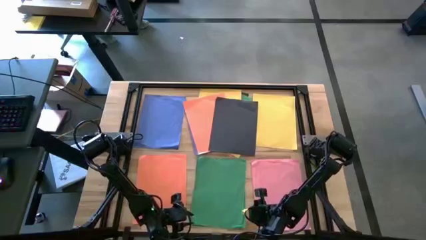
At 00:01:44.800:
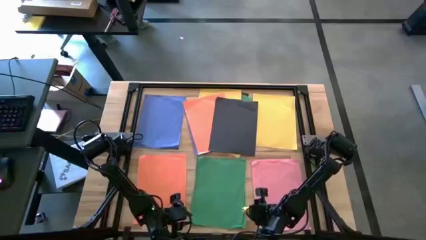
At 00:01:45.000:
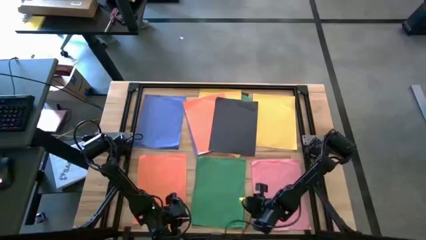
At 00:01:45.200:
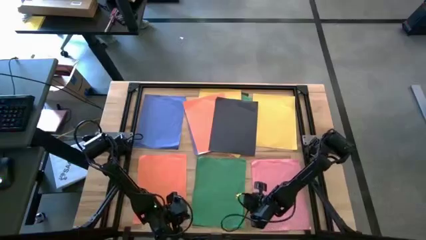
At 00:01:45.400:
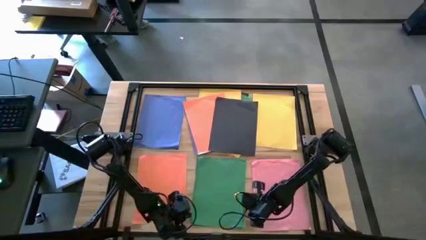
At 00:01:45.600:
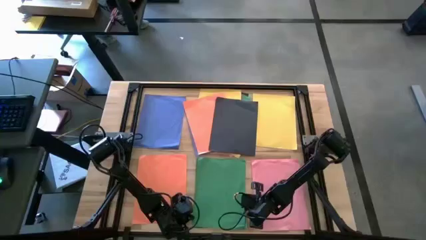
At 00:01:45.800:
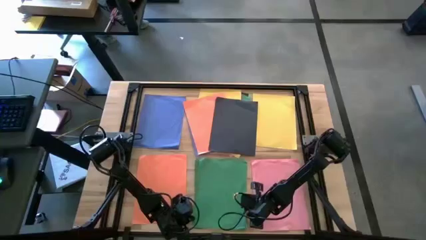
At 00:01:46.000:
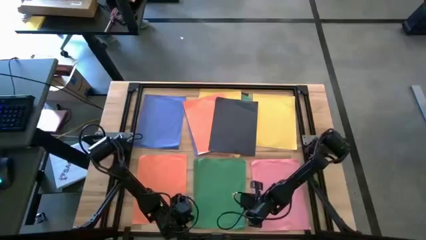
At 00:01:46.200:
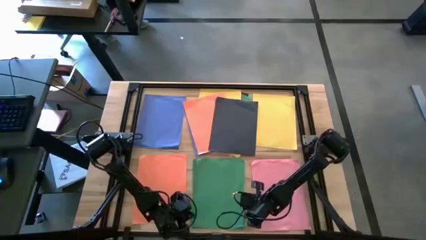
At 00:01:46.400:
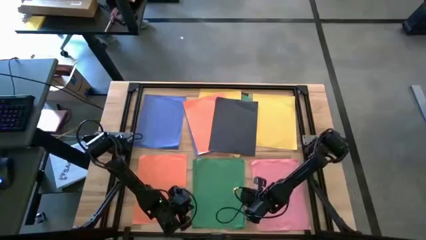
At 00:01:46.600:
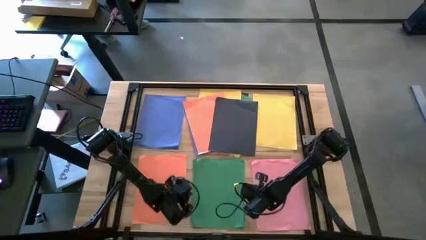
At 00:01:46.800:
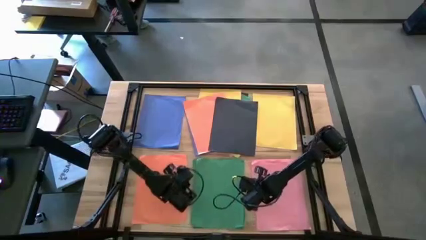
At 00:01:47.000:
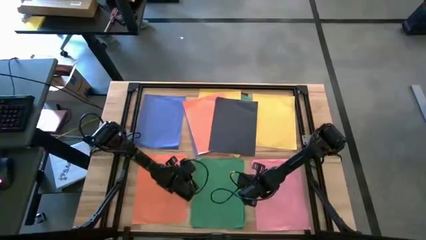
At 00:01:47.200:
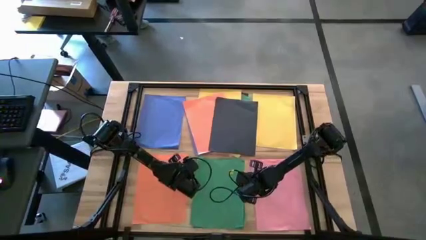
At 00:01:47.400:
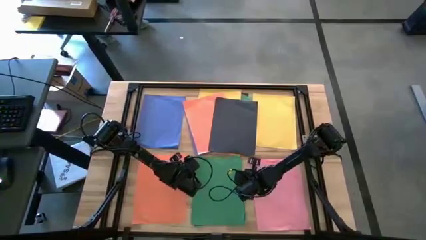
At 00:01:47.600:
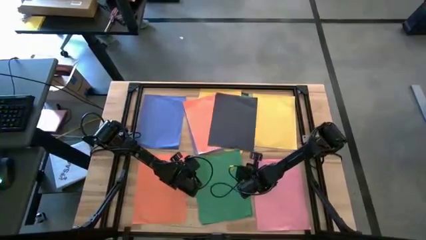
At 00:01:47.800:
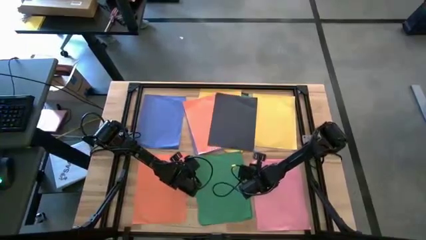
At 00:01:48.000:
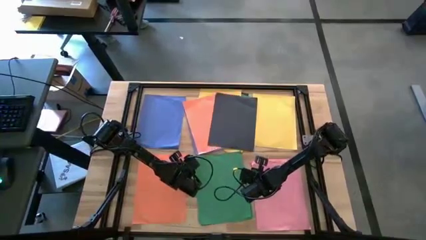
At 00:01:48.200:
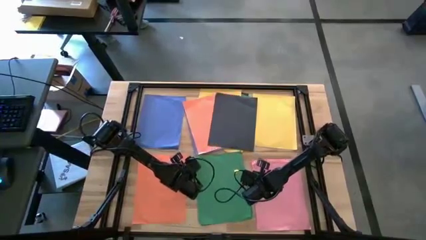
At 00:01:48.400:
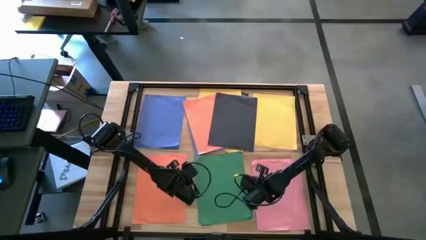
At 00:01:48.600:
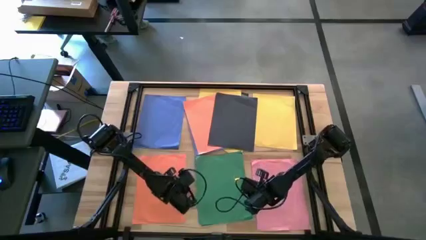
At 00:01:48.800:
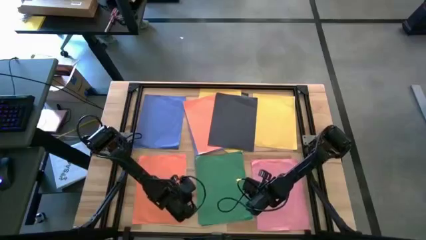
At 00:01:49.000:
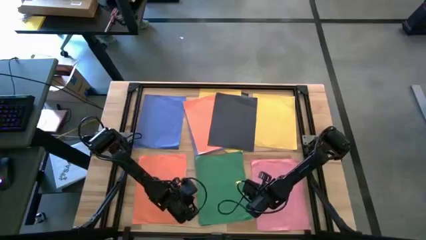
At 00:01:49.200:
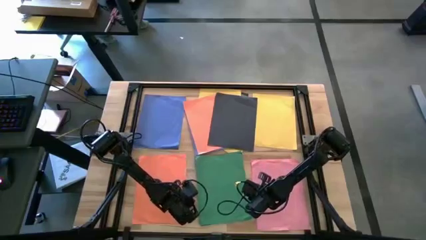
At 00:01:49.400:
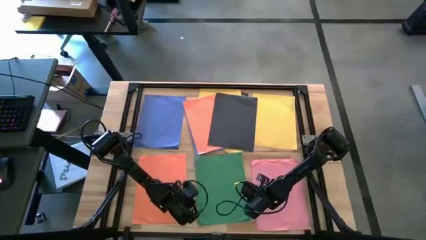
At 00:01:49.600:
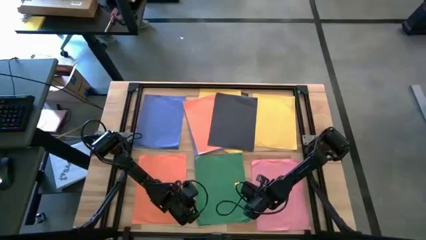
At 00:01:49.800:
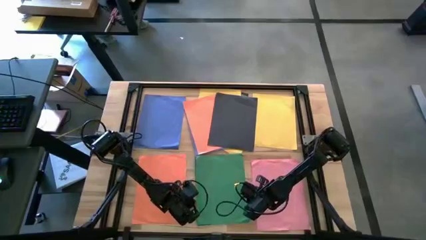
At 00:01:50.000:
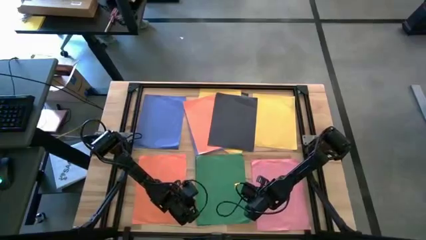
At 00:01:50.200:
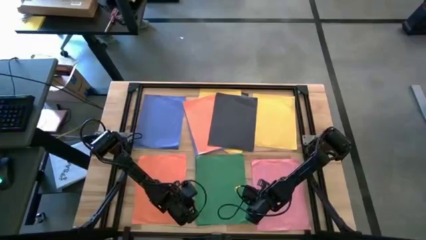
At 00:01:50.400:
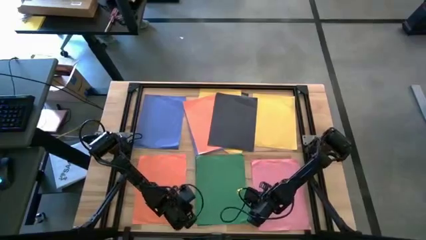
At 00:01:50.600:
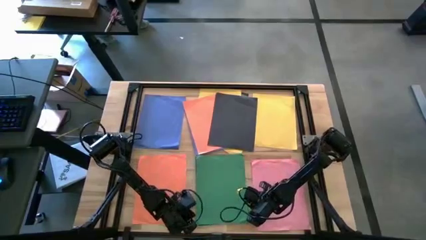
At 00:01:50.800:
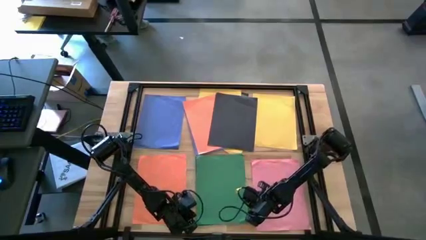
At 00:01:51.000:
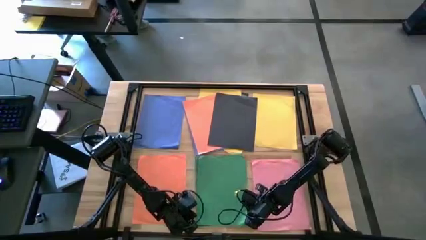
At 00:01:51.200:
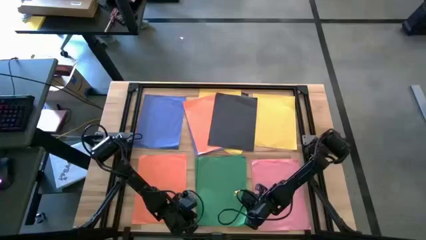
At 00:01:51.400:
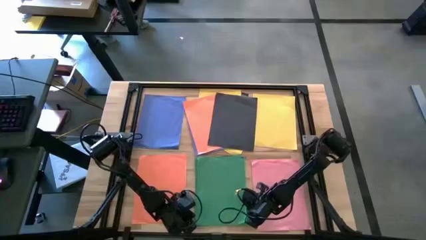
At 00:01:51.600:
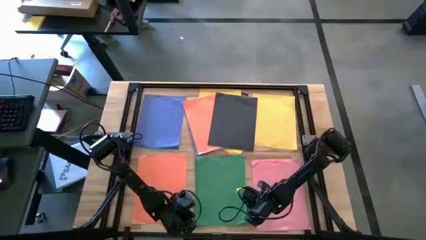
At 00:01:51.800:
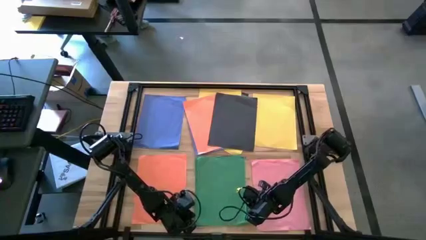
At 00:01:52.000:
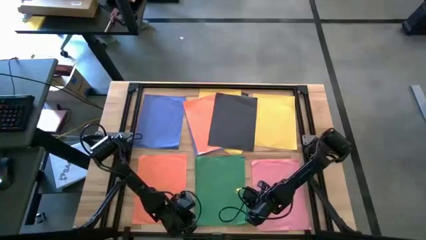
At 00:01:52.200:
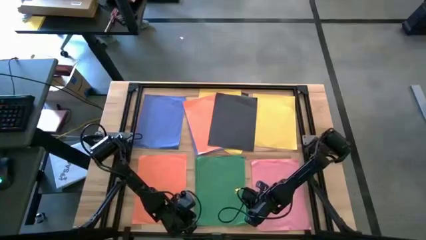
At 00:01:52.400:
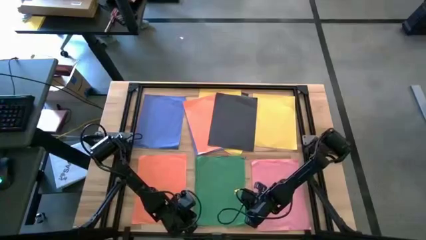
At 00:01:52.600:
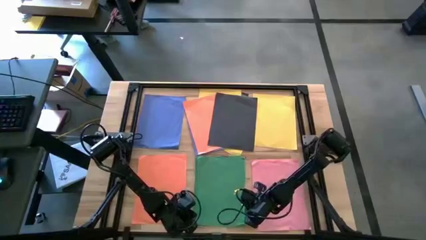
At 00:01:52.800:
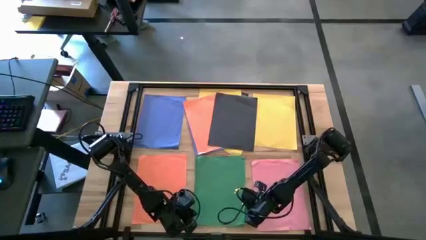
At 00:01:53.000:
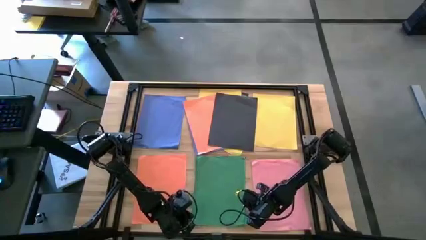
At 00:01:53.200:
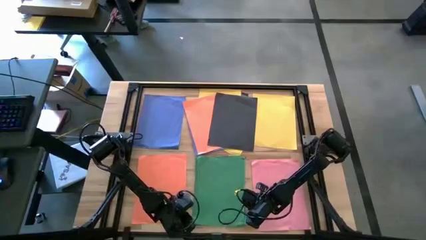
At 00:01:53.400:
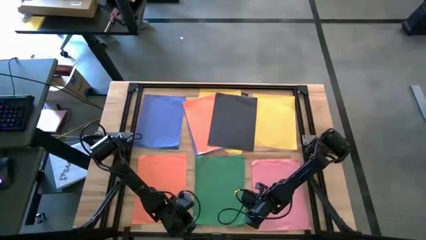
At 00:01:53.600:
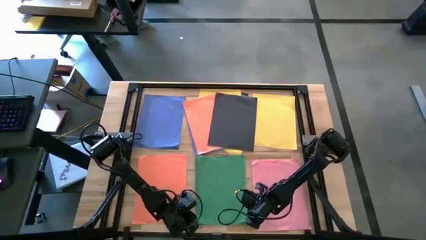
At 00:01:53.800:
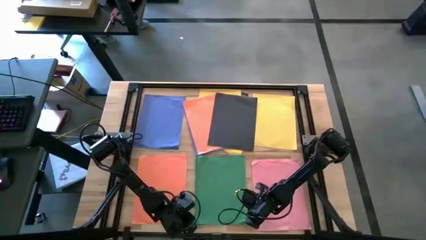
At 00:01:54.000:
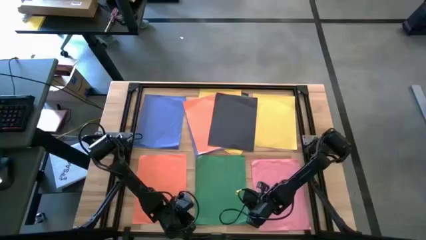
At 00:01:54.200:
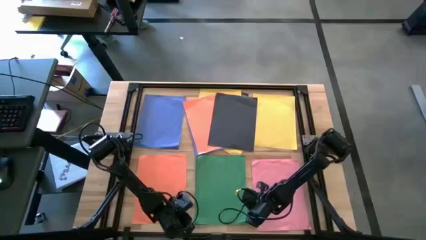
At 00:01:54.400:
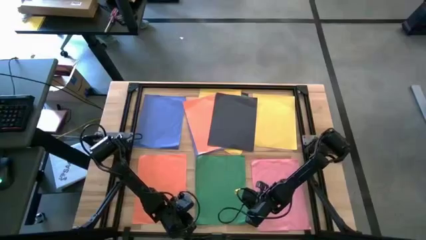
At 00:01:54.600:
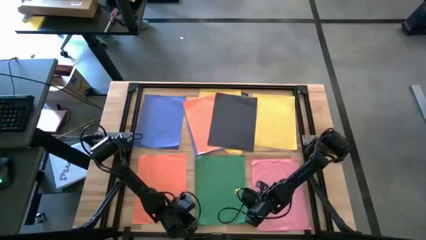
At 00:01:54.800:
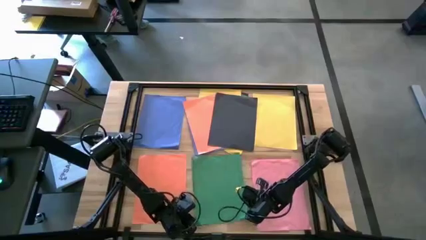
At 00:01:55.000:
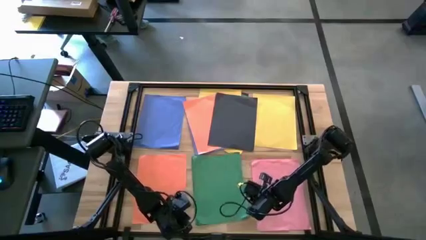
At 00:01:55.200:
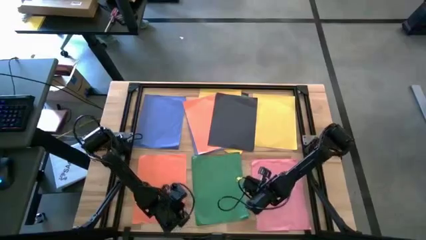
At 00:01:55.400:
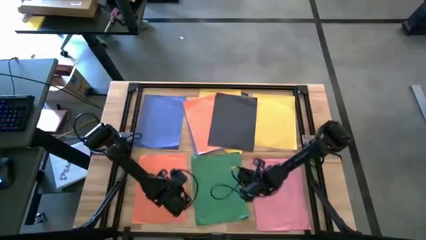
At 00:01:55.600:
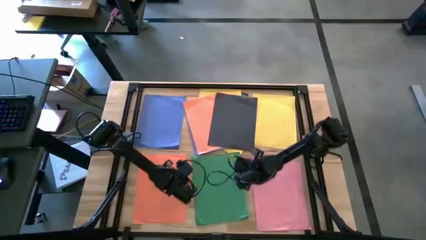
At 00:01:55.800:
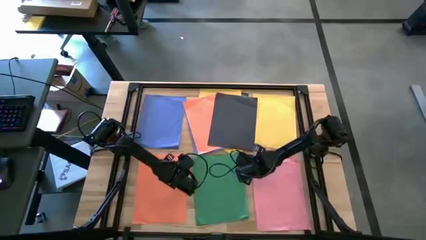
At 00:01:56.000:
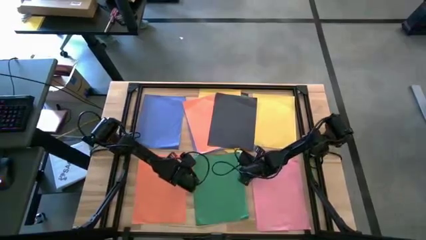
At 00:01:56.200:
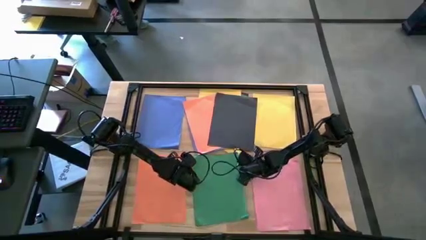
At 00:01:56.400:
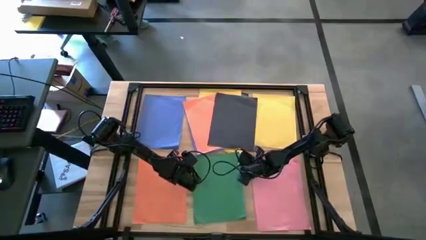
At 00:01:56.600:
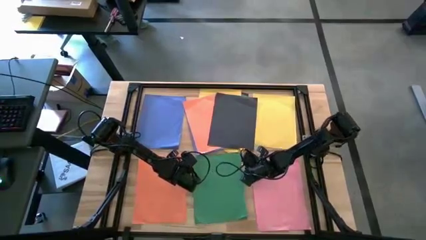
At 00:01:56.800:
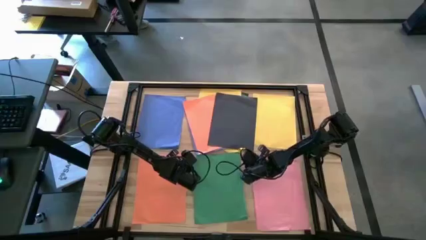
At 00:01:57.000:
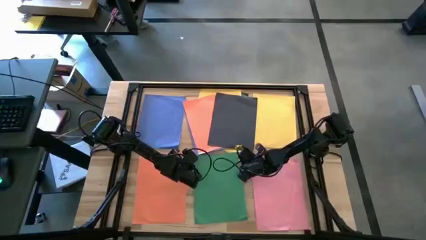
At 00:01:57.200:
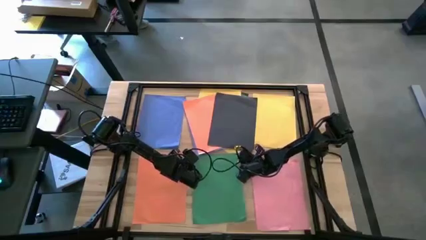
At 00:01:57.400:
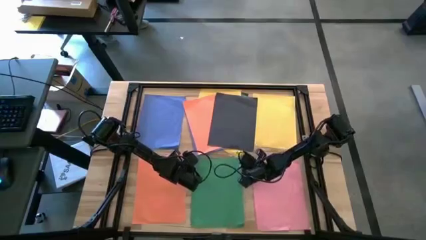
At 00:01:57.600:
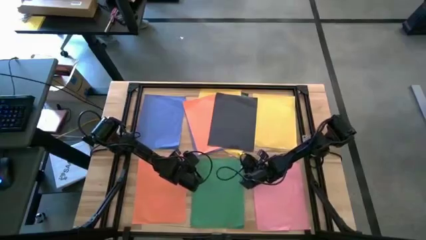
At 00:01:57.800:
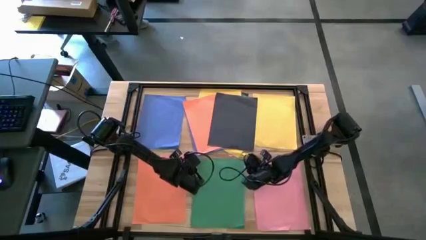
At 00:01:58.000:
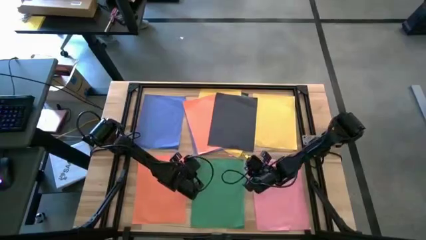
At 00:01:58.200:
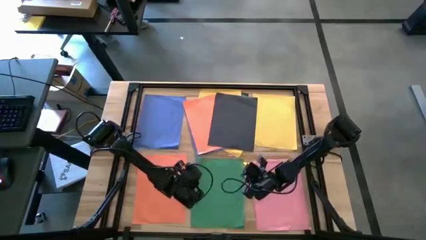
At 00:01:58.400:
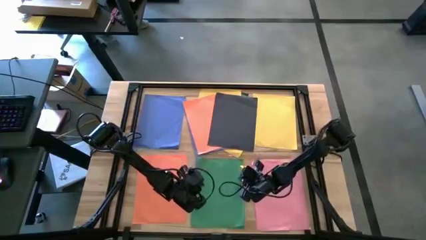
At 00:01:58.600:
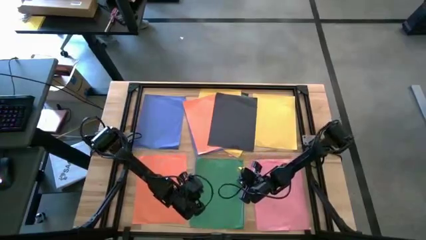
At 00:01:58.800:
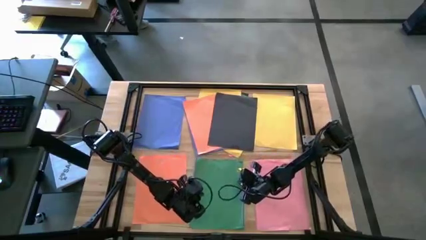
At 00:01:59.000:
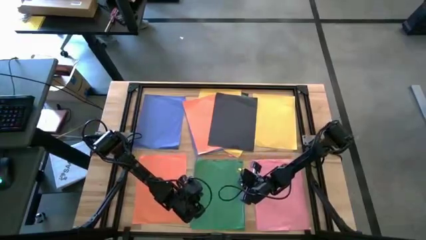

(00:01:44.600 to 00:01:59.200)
Task: Organize paper
Stack the green paper under the black paper on the bottom green paper
